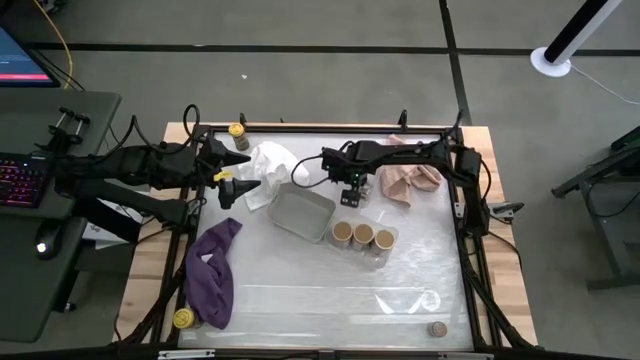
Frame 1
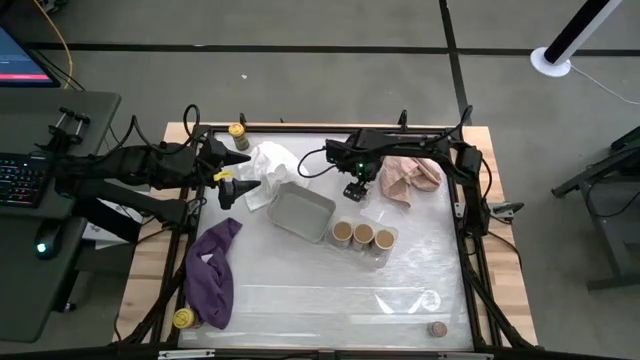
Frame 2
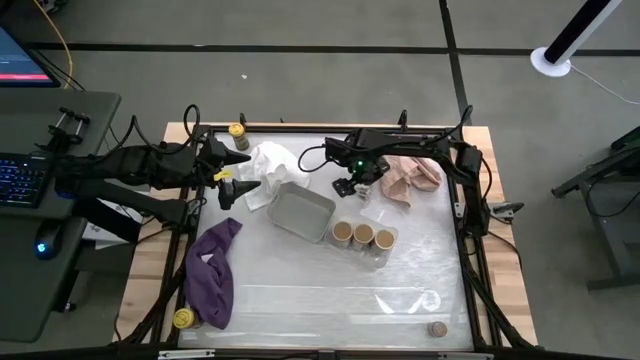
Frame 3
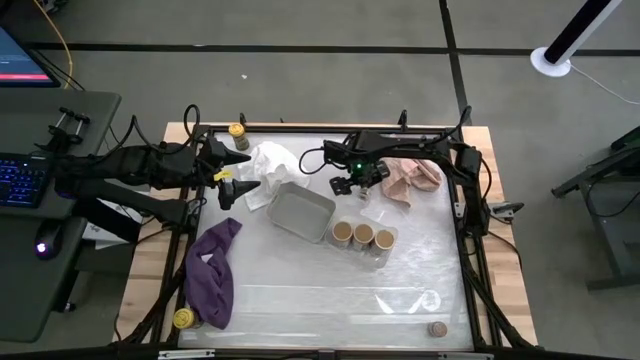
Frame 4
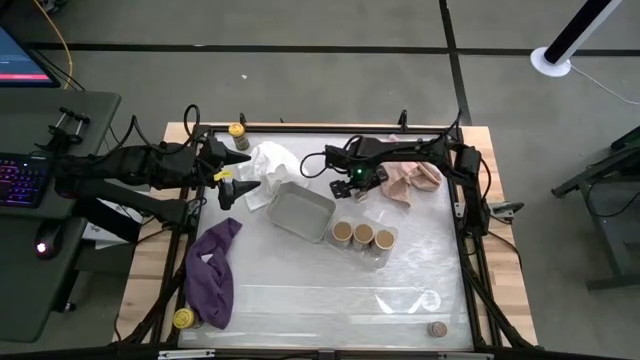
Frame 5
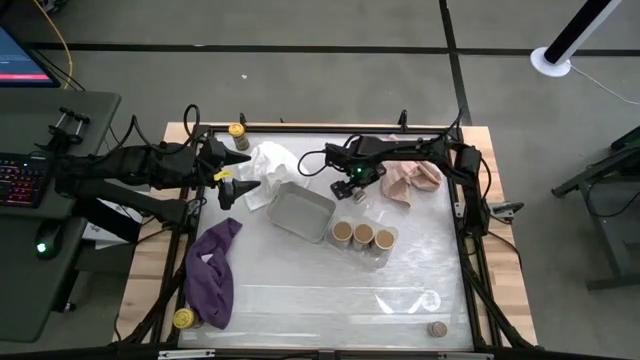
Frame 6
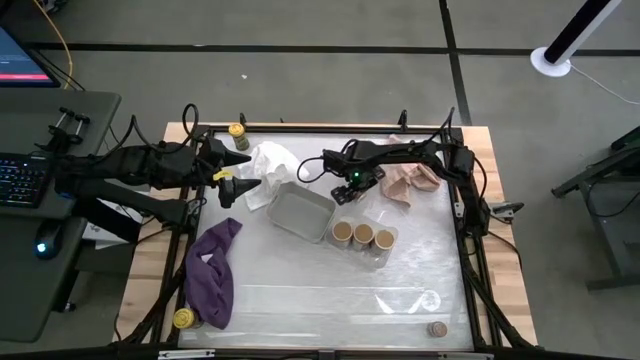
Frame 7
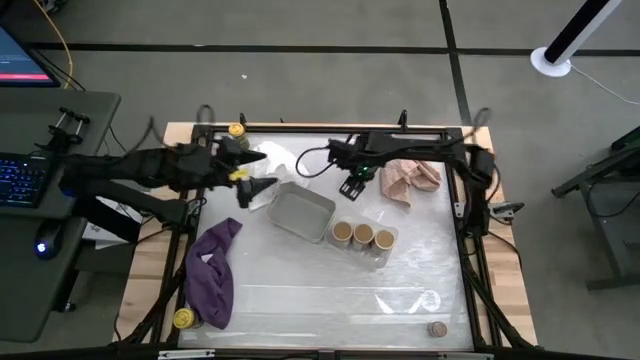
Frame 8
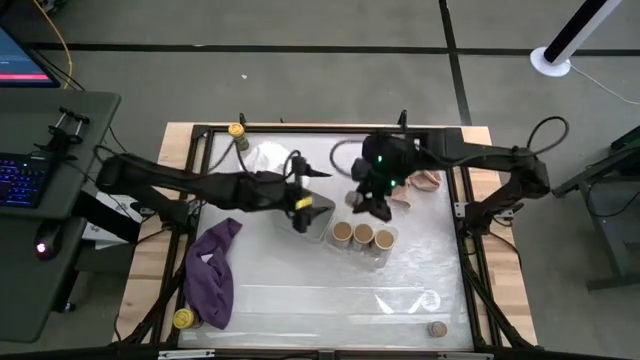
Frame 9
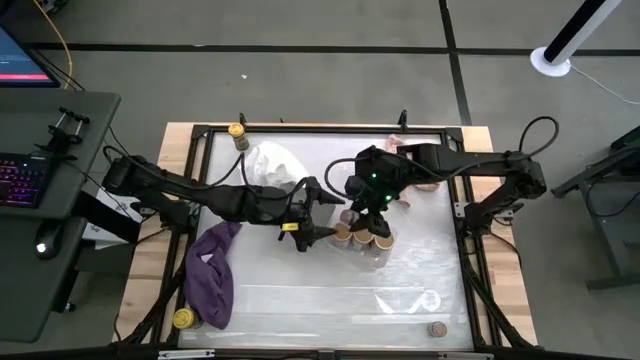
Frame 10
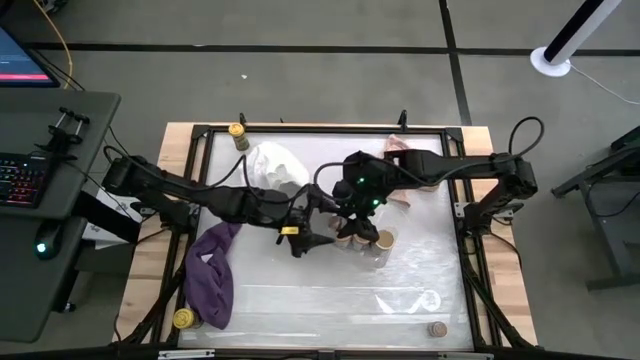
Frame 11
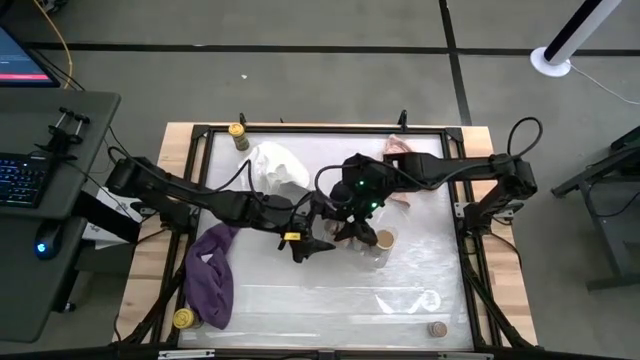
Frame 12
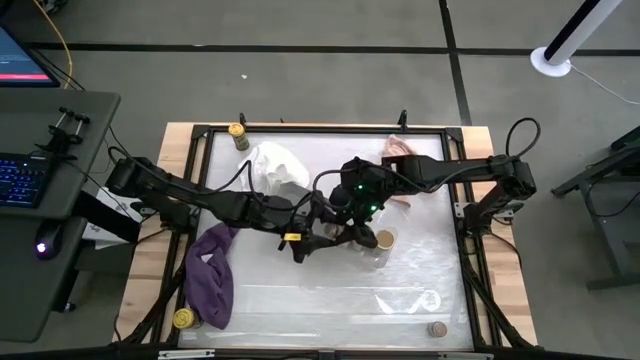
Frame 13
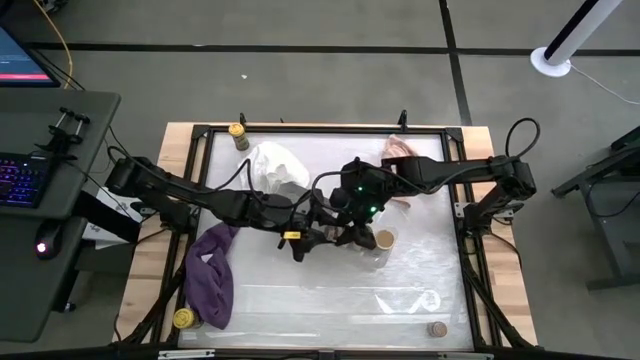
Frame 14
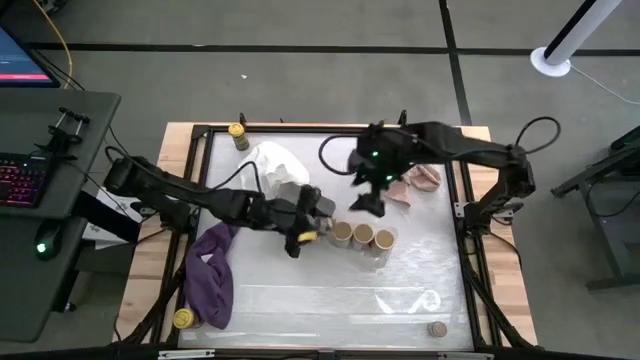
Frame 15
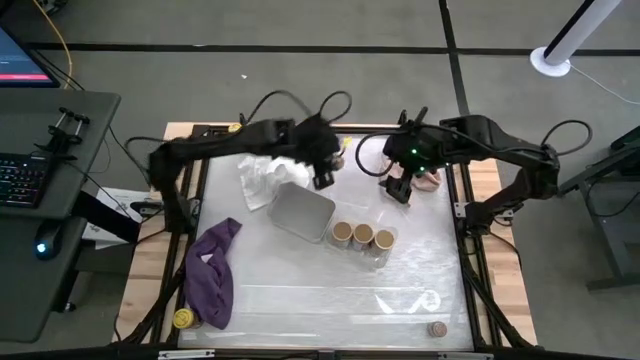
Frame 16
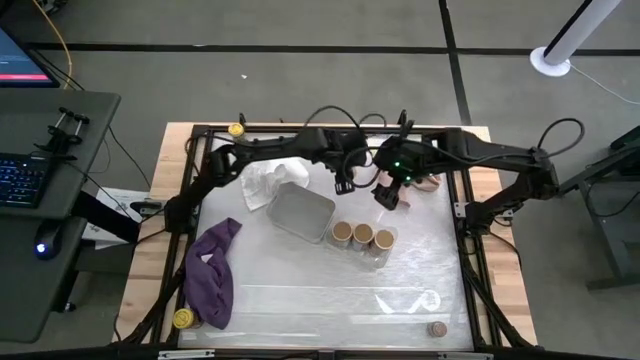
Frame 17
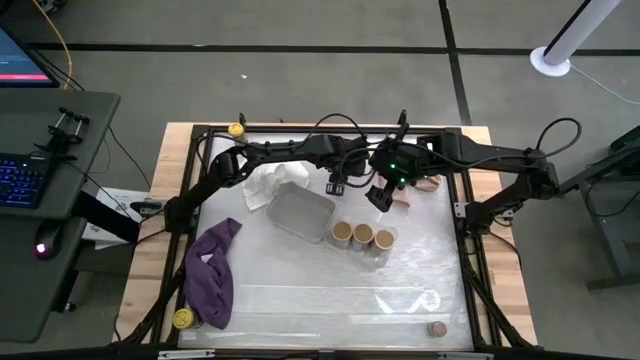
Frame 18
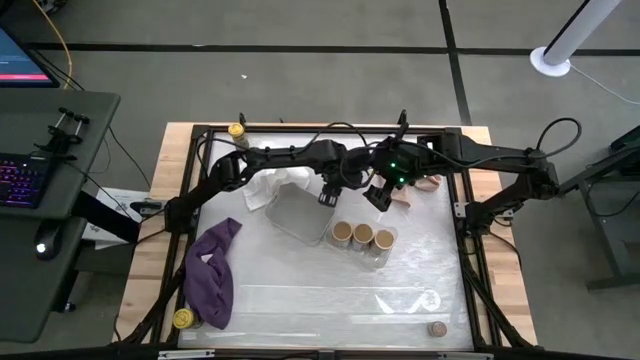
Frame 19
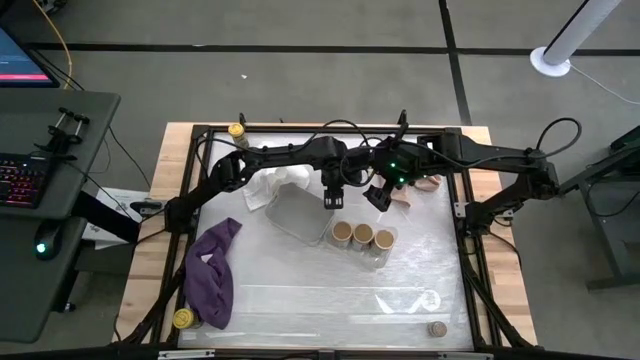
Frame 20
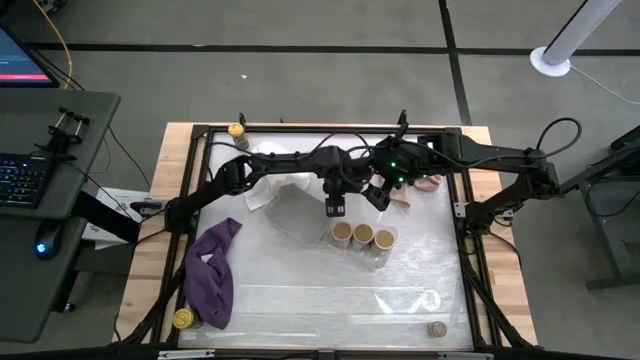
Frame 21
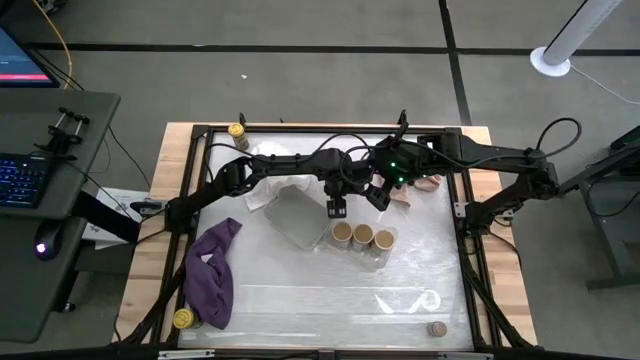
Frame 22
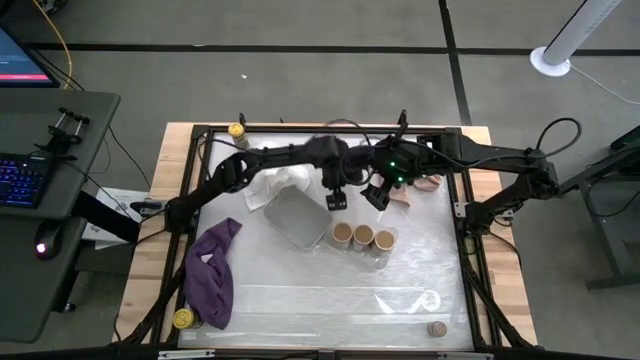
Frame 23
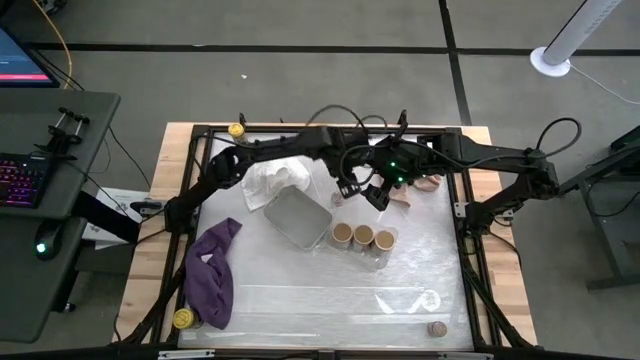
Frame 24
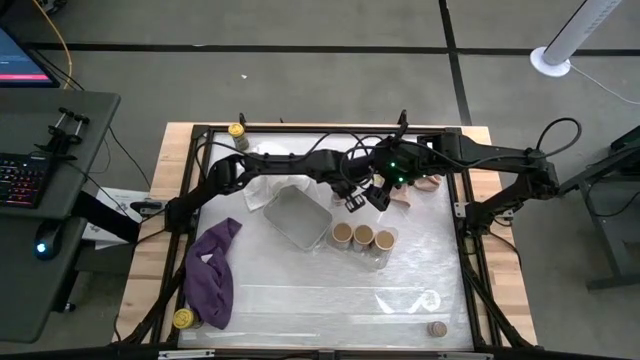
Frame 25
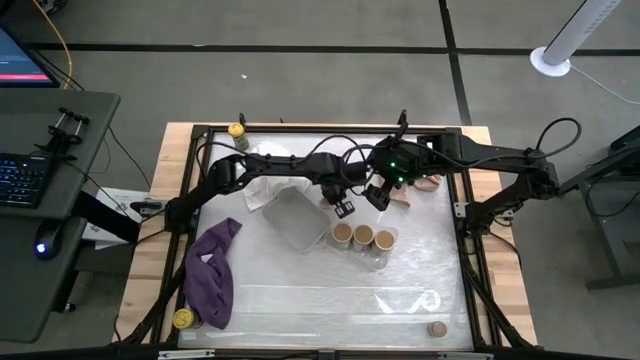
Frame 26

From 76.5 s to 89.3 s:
Task: Sort spices by type
Put the left brown seasoning bottle into the top transparent bin

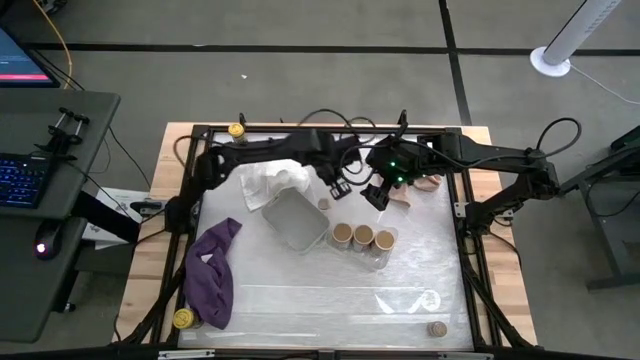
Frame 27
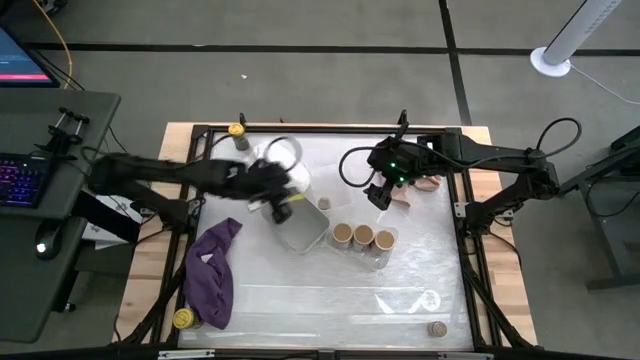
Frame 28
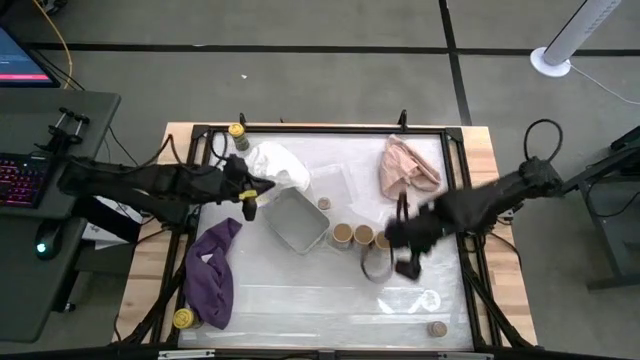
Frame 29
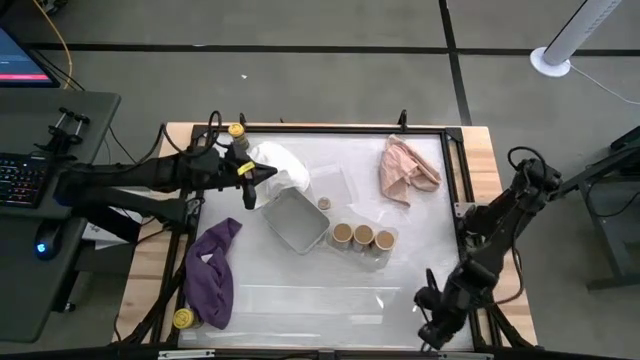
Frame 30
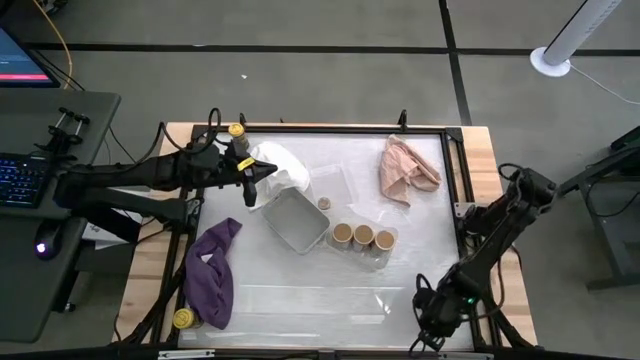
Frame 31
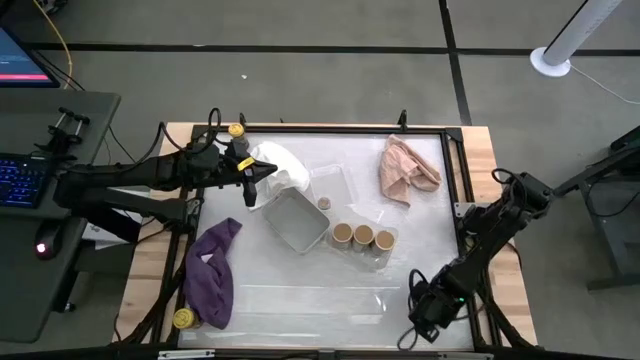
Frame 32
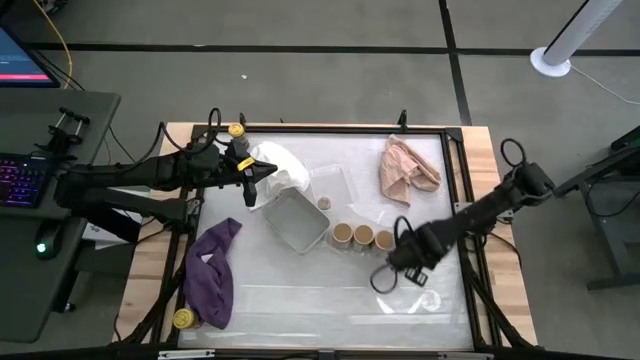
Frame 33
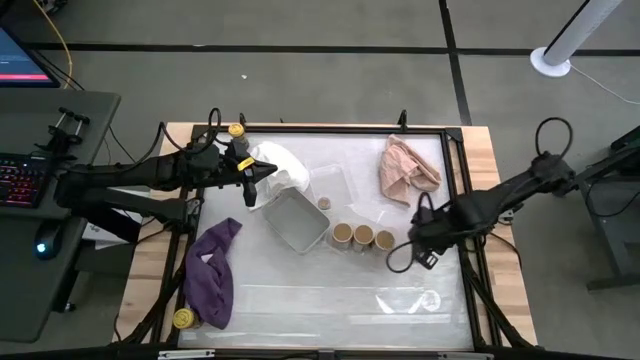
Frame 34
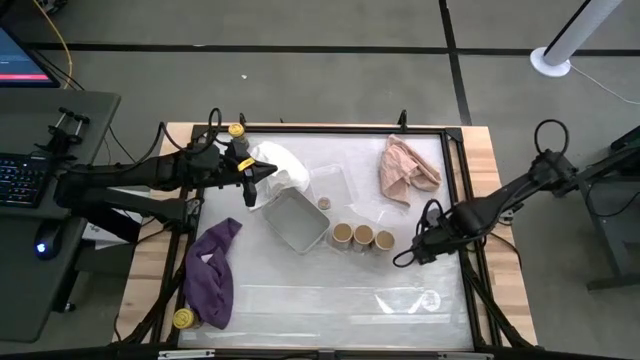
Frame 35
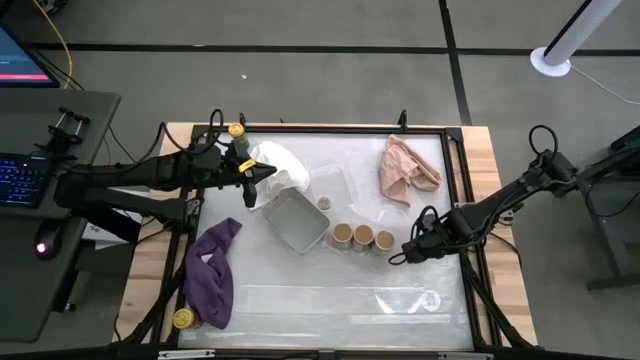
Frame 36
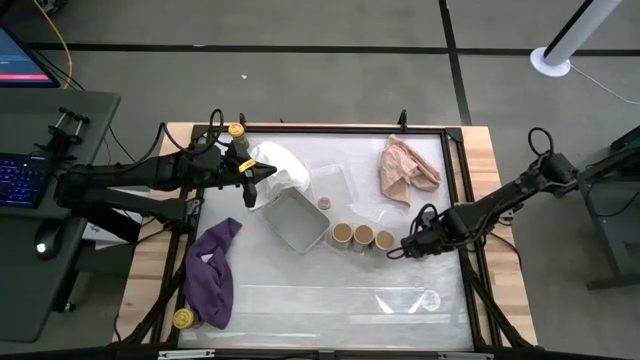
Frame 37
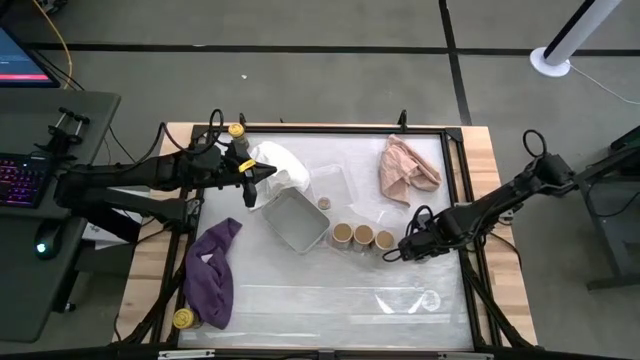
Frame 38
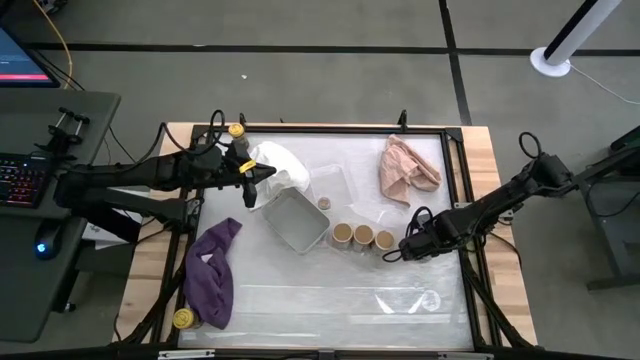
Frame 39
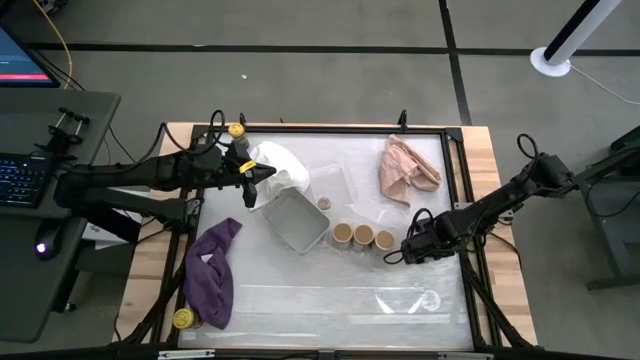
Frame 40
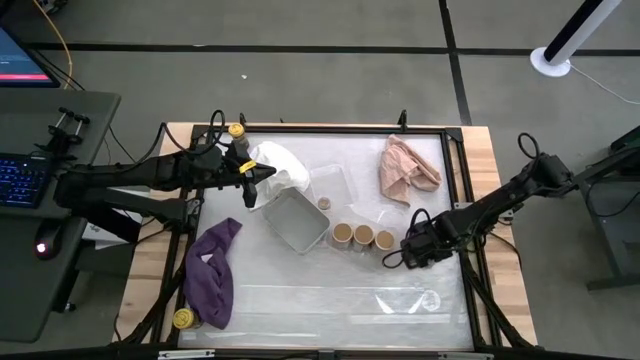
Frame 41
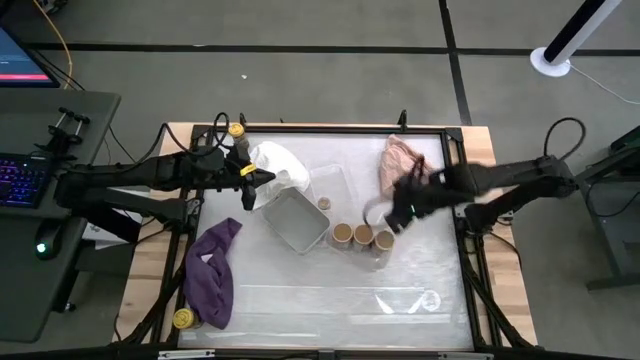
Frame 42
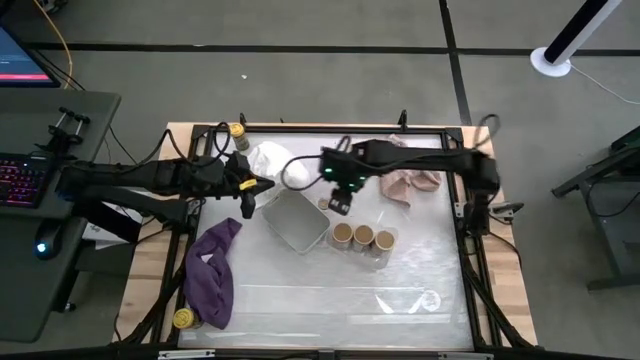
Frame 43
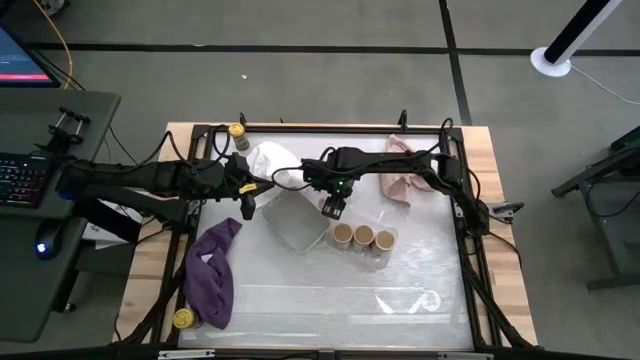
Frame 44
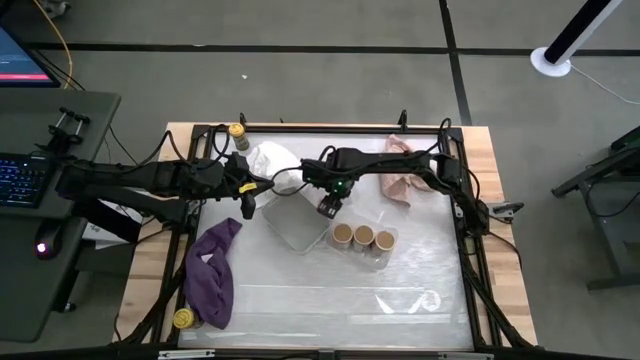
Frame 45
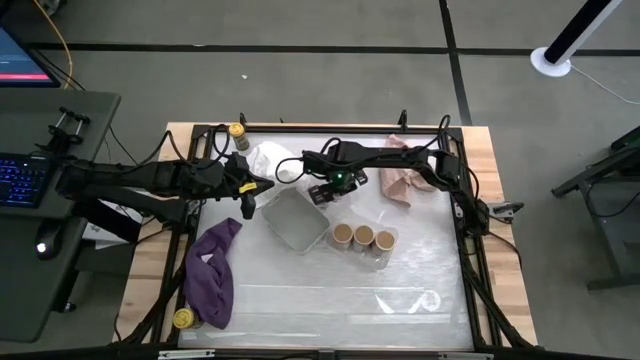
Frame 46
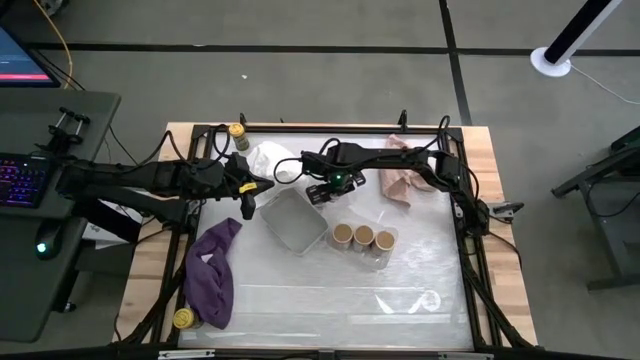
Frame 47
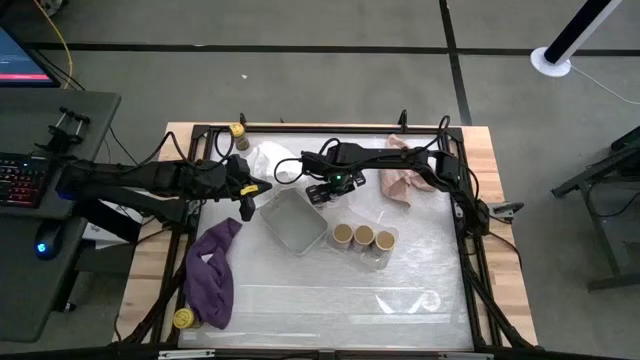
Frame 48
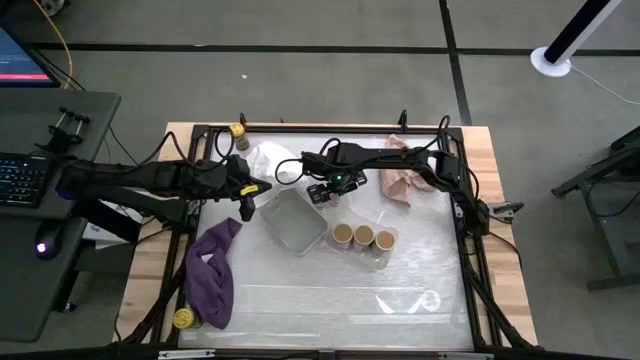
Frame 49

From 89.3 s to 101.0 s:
Put the brown seasoning bottle into the top transparent bin
